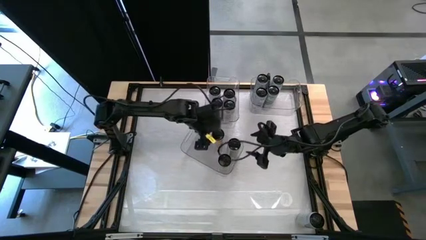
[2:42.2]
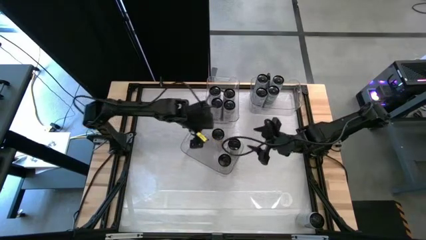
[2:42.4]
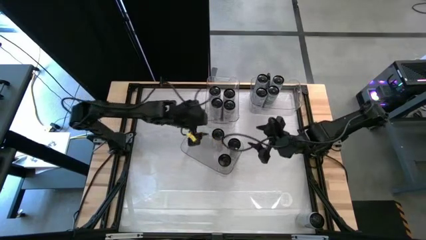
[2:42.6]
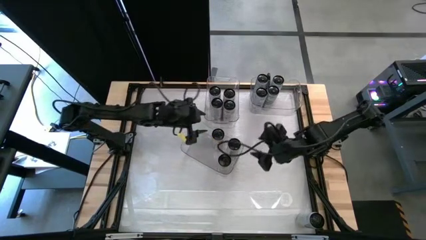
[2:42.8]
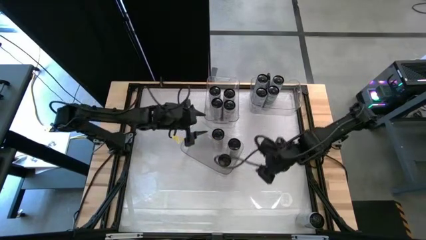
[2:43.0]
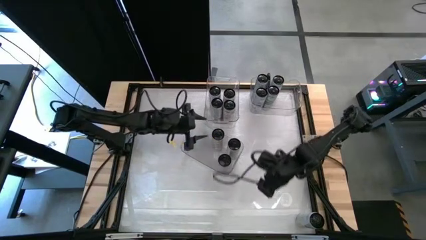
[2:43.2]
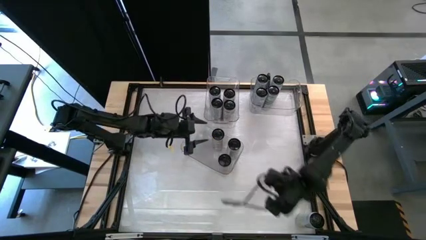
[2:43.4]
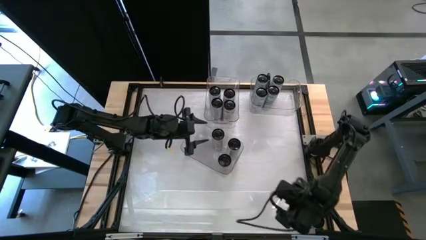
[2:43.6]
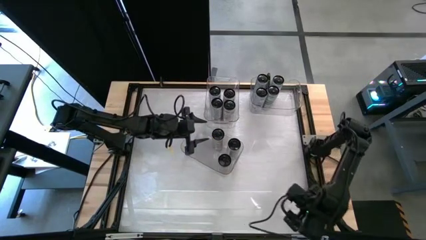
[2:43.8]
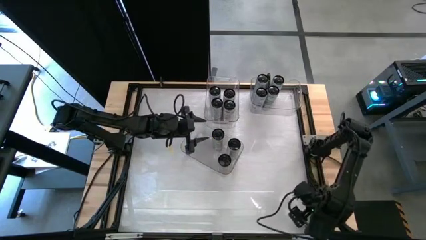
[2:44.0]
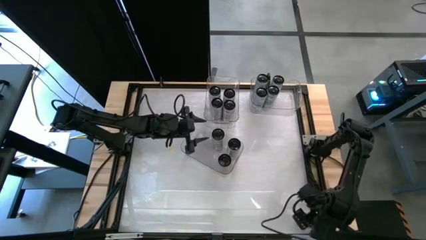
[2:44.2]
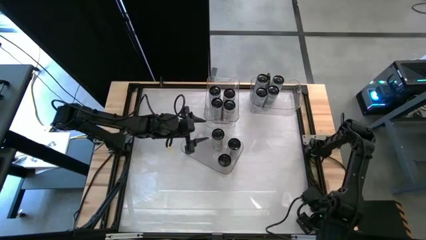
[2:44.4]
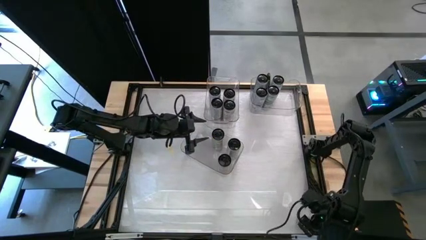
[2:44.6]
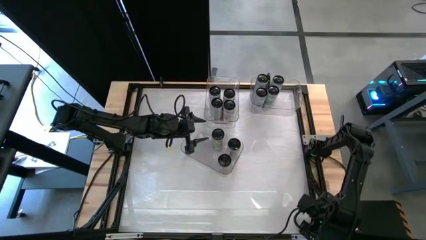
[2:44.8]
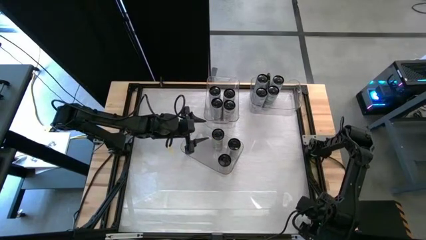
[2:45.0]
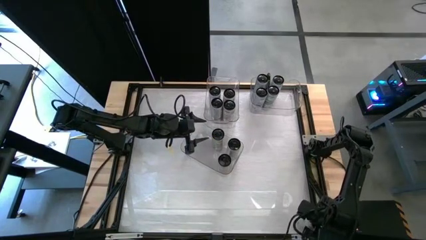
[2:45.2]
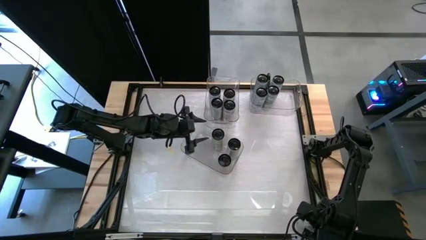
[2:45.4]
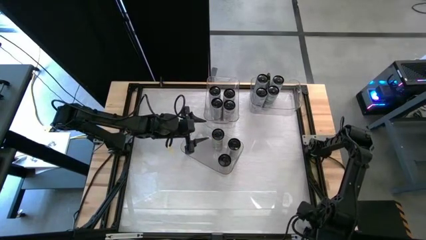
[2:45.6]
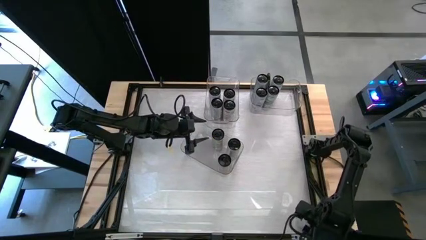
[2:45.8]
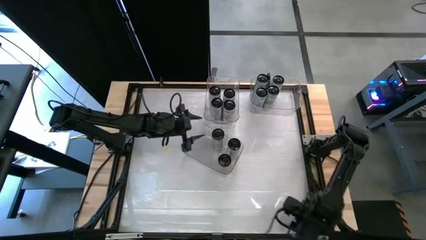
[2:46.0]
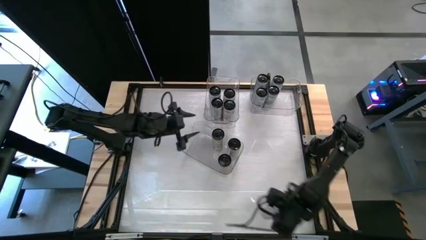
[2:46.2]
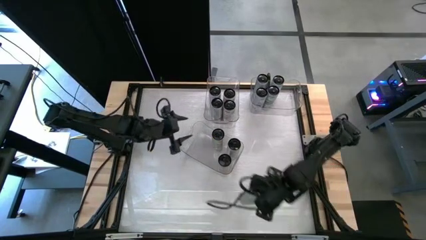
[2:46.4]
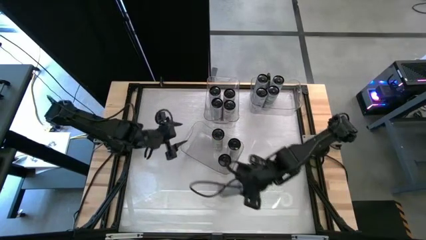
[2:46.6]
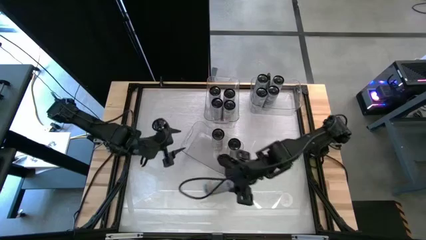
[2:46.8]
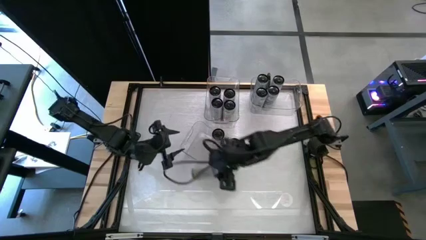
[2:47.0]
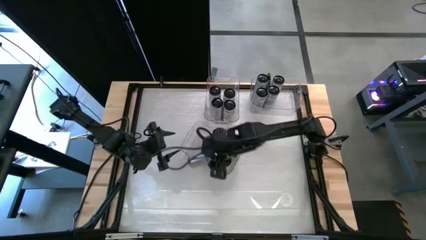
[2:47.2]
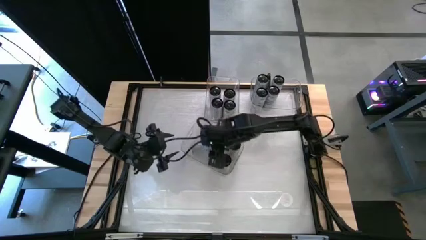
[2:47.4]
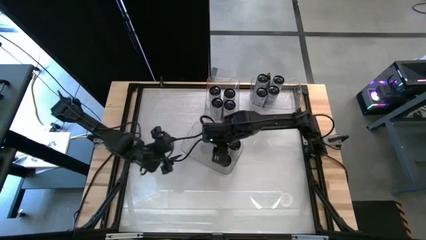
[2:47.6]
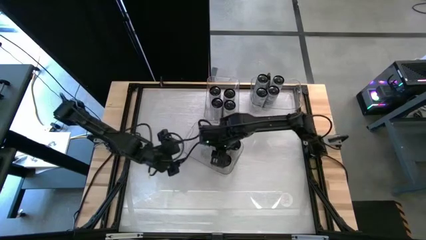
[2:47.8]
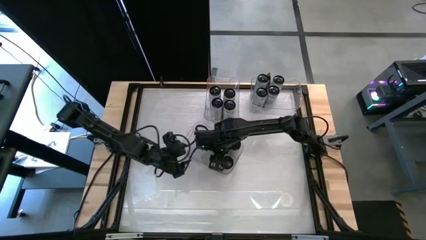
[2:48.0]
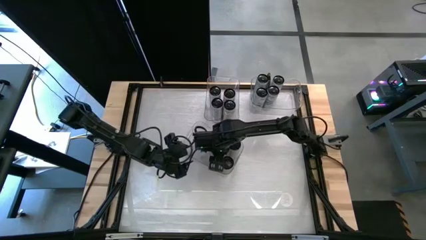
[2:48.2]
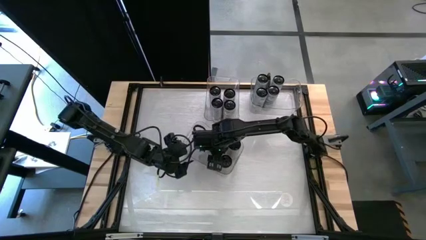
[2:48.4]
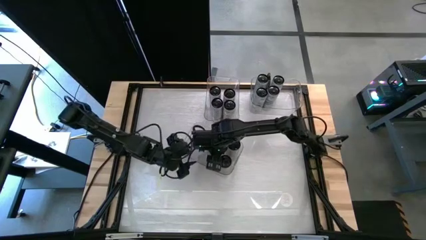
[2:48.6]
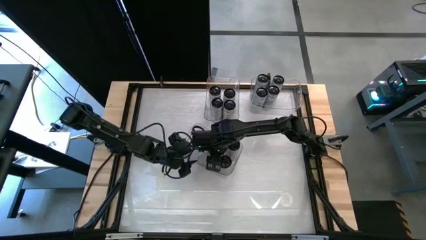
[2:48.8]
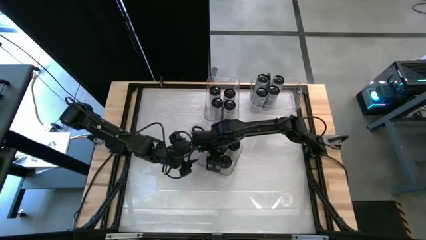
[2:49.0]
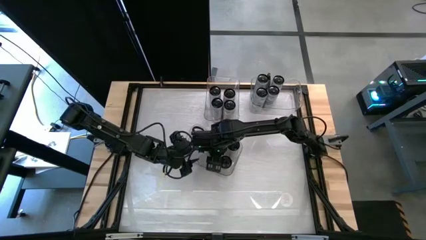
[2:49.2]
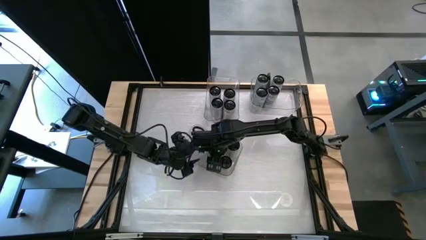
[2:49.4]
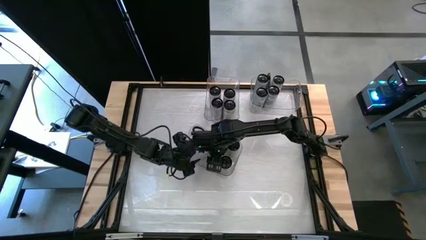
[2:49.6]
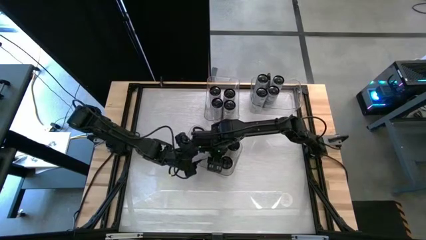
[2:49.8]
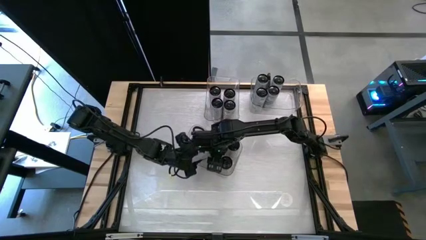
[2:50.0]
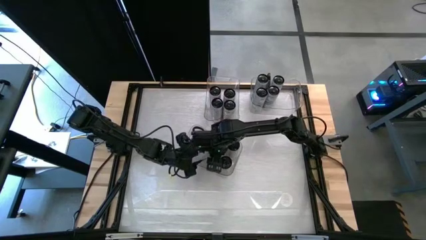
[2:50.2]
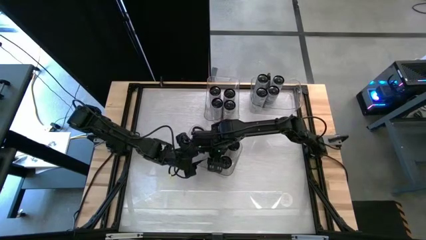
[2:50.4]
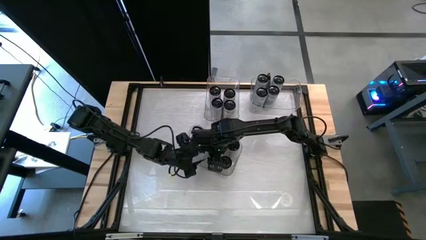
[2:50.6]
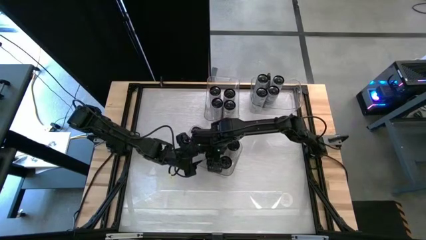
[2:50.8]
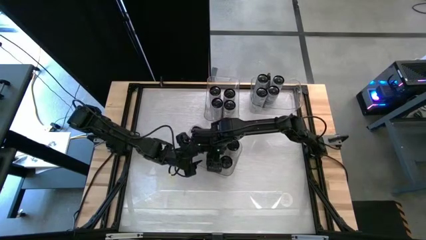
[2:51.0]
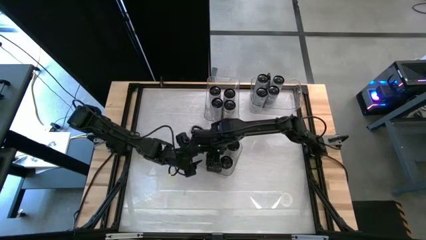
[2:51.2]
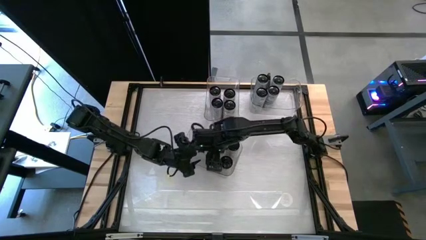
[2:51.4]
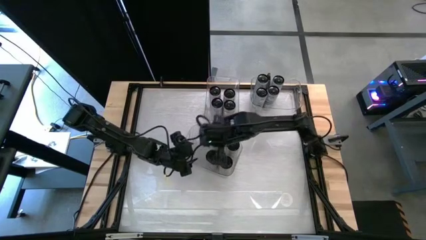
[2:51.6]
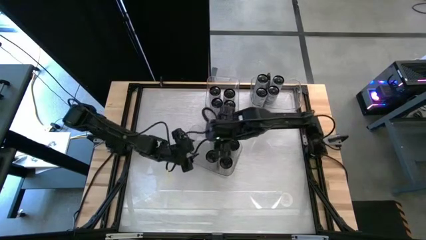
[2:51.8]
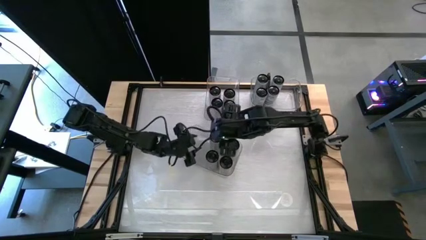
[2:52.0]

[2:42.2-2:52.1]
Task: Sort soda cans
Put the white-yellow can into the bottom transparent bin

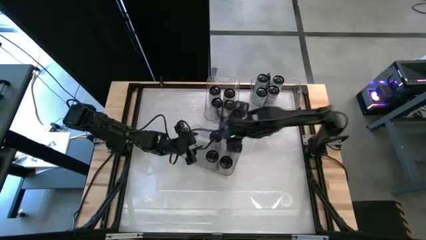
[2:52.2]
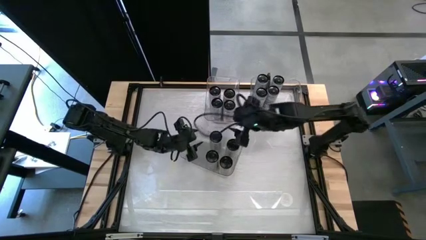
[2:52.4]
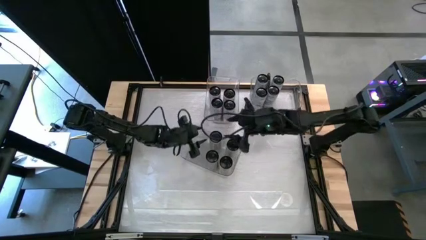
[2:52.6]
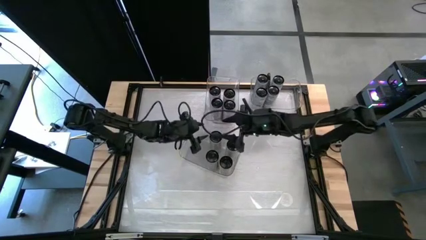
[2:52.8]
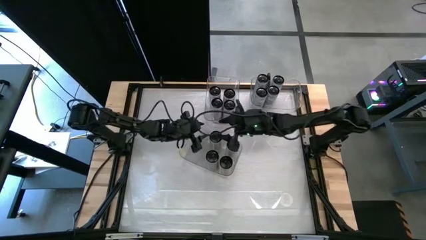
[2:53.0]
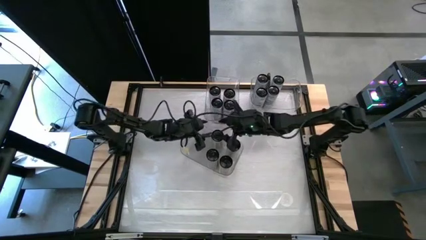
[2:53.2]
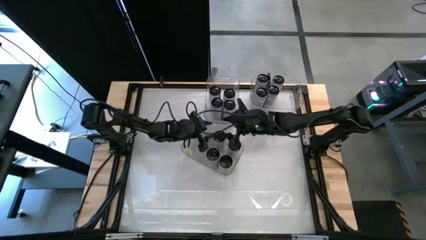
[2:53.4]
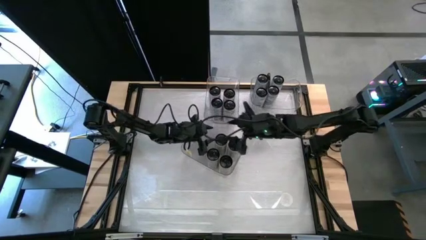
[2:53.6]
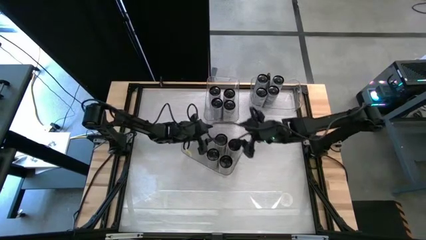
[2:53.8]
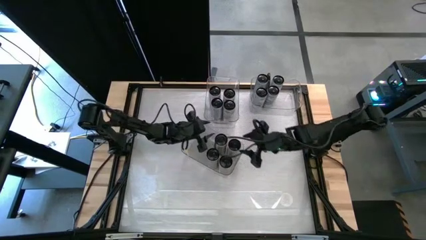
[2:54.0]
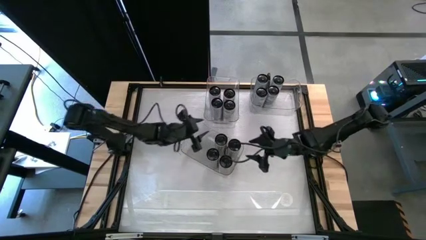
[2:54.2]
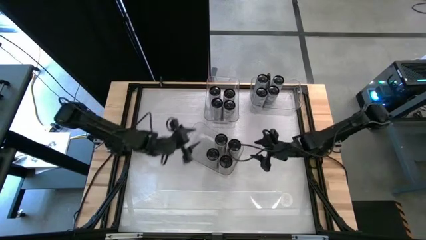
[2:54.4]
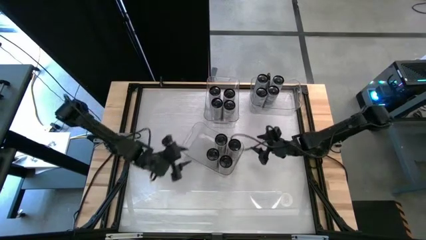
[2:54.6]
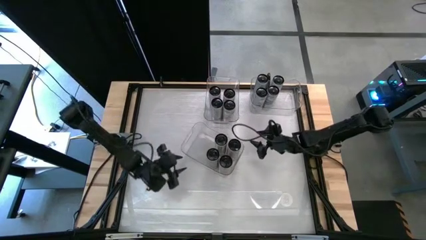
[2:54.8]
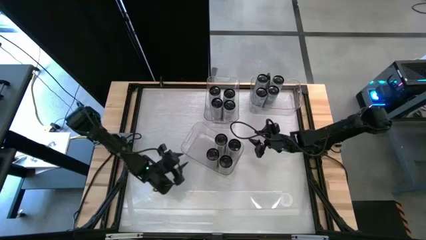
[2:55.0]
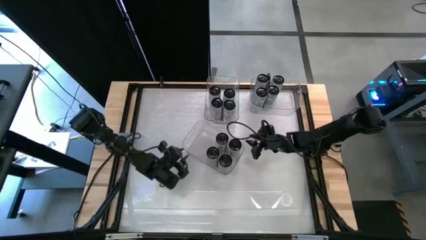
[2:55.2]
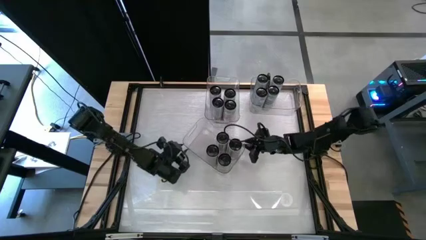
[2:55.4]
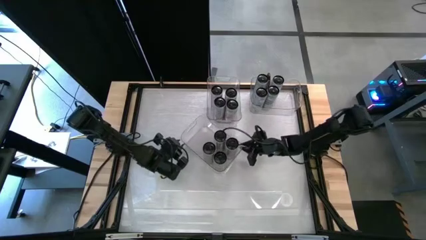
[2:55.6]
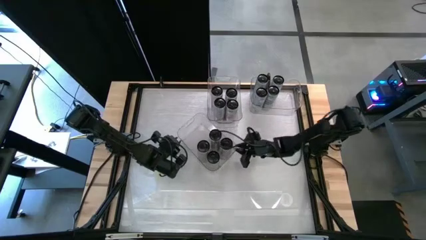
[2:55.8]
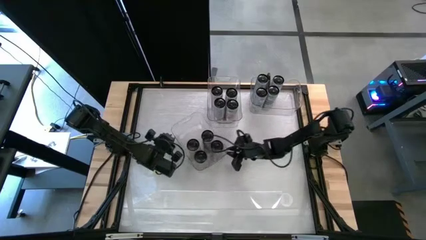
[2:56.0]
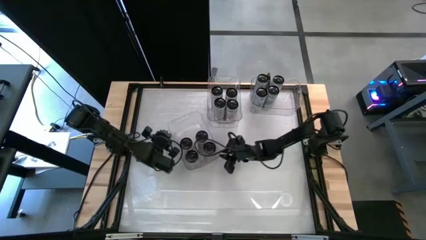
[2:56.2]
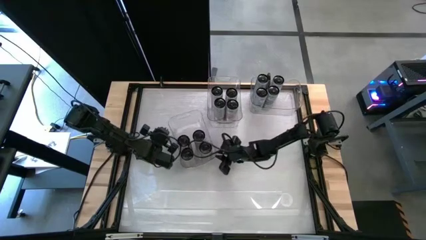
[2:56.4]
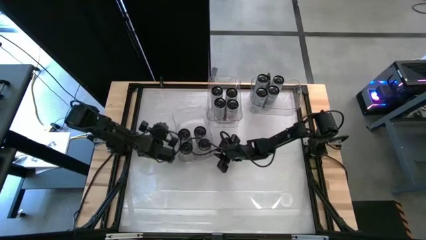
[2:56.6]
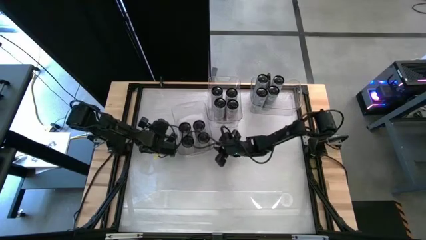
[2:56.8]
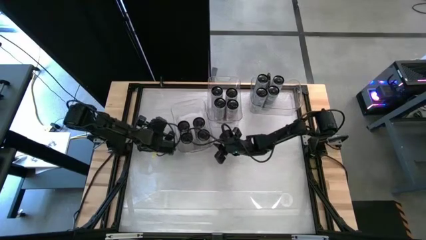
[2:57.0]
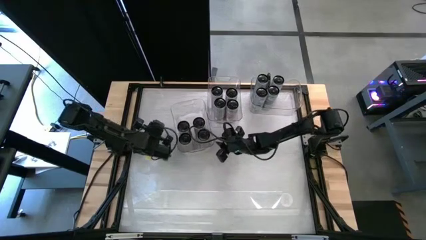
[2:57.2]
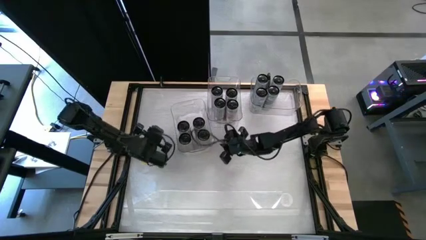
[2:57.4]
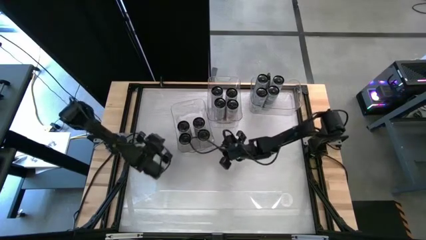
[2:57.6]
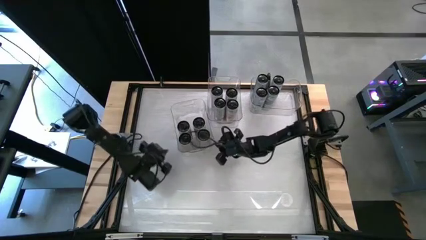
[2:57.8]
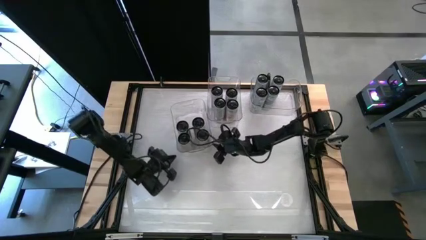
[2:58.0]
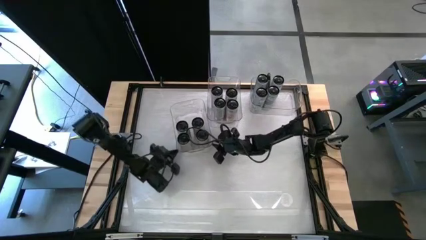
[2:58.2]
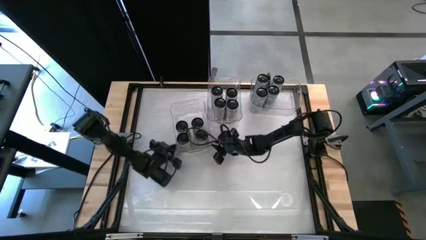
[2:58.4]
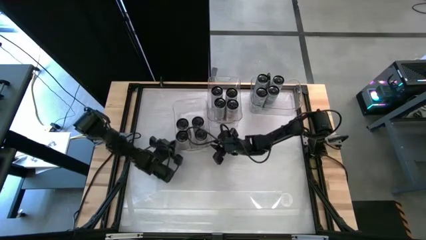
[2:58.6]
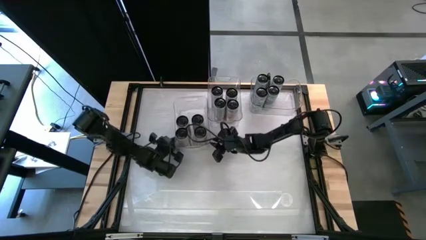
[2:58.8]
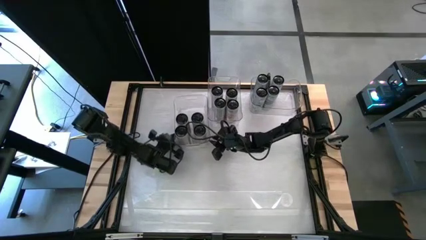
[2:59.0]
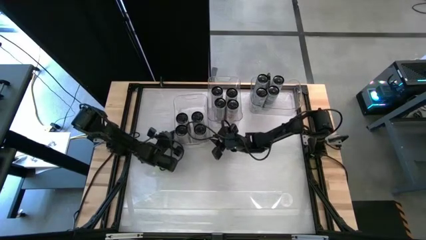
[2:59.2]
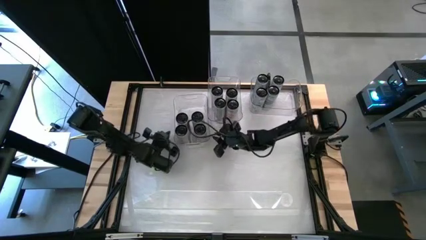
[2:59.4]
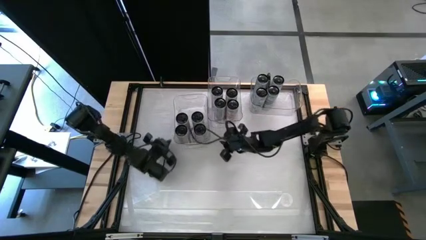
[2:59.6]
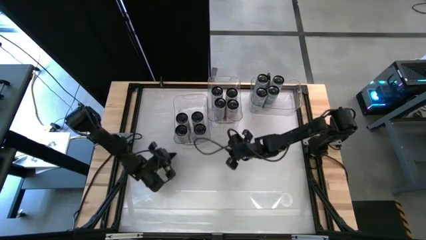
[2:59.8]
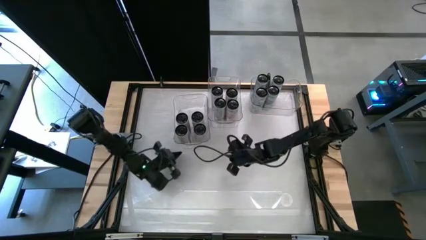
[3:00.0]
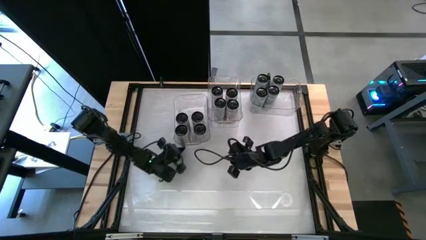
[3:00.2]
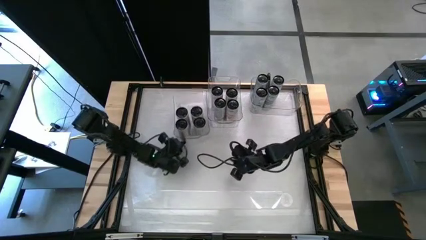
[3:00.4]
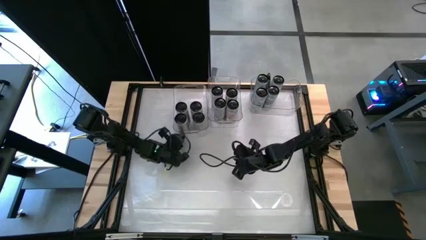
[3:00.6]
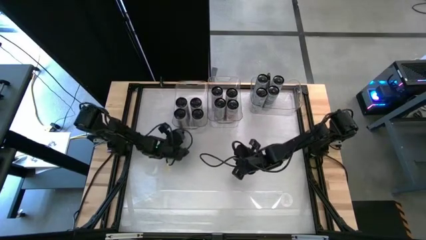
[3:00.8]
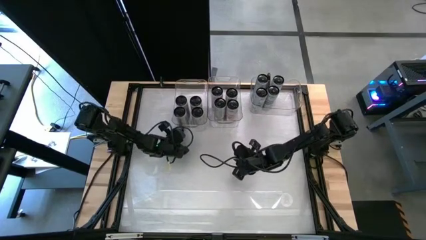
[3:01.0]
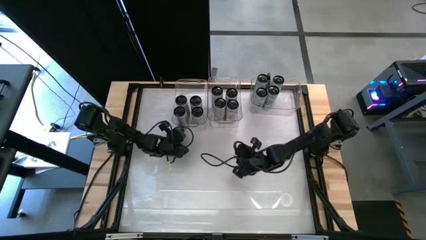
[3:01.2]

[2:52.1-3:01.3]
Move the bottom transparent bin to the top left of the table
